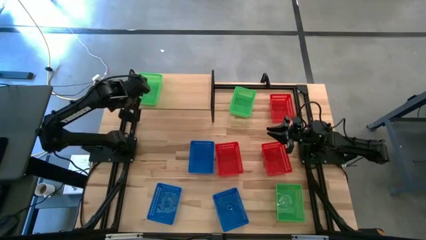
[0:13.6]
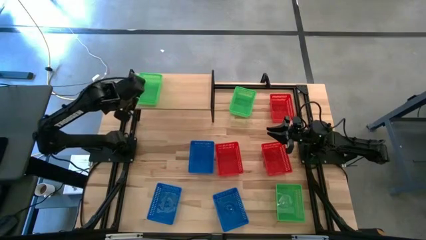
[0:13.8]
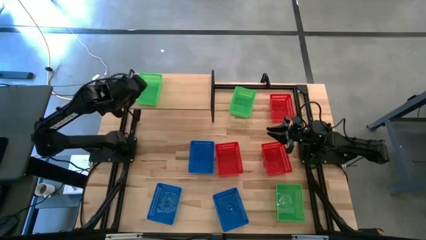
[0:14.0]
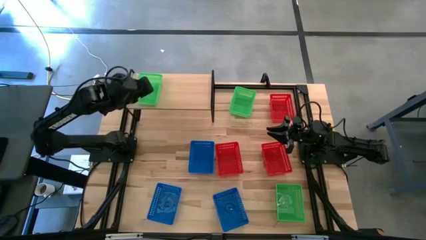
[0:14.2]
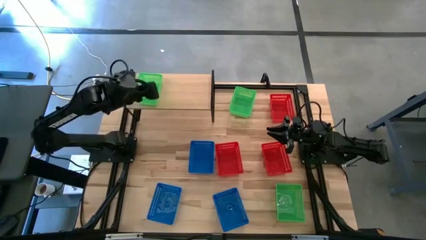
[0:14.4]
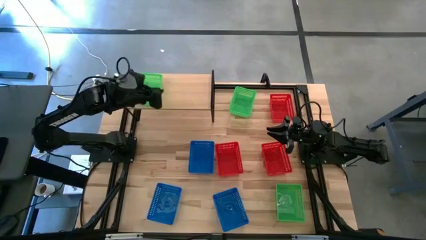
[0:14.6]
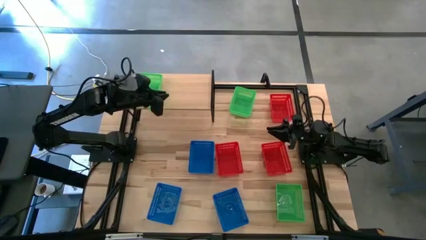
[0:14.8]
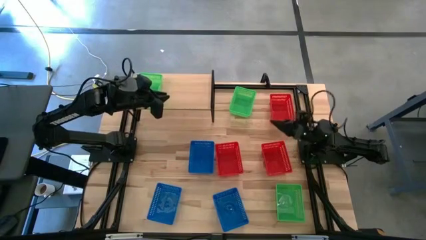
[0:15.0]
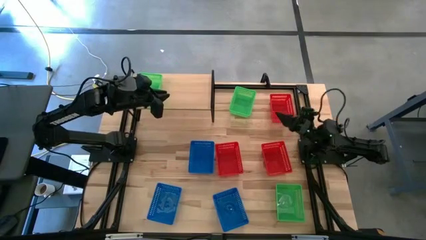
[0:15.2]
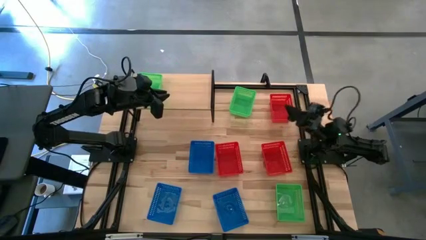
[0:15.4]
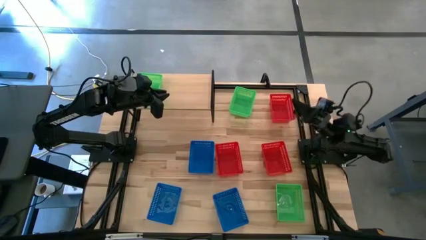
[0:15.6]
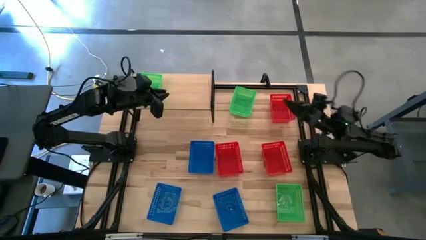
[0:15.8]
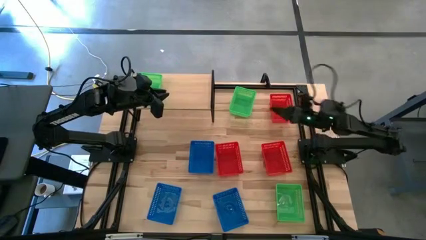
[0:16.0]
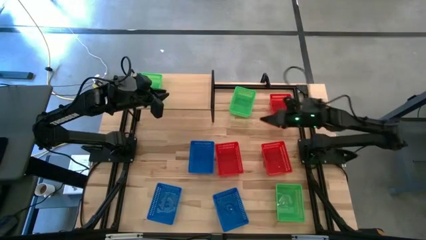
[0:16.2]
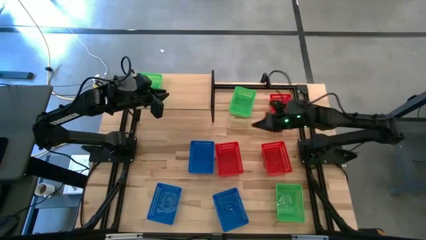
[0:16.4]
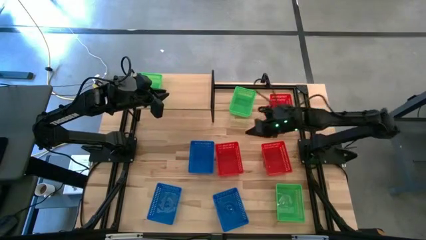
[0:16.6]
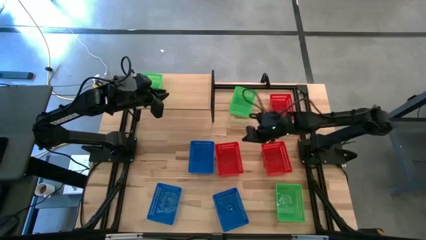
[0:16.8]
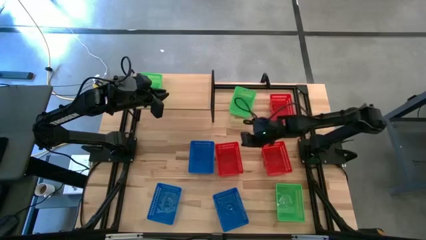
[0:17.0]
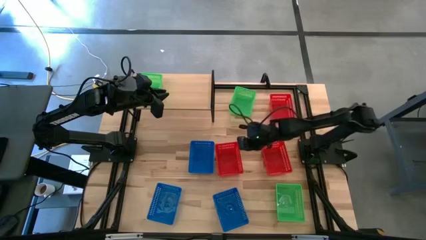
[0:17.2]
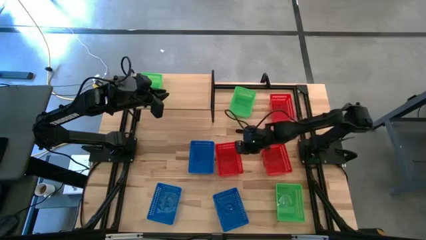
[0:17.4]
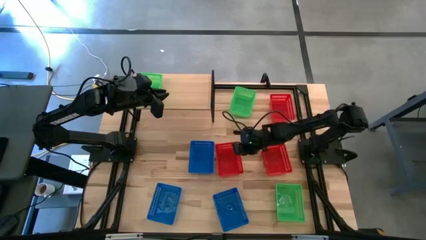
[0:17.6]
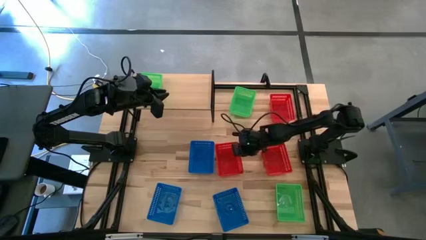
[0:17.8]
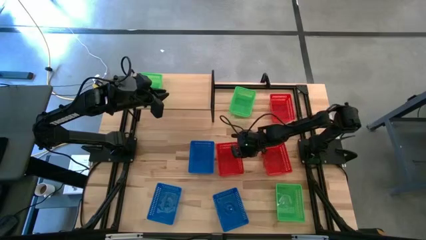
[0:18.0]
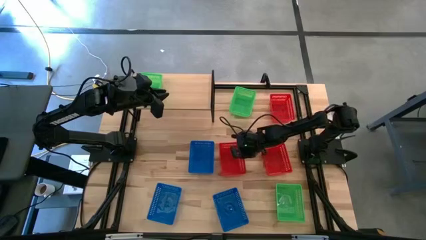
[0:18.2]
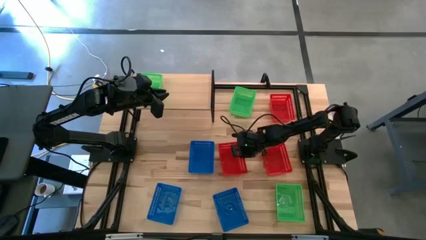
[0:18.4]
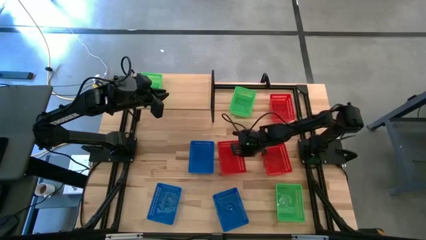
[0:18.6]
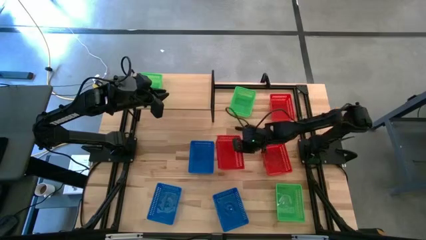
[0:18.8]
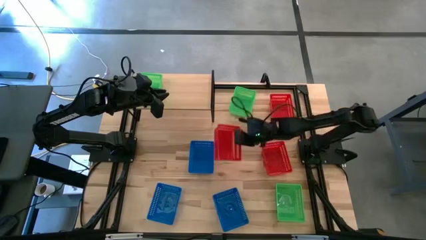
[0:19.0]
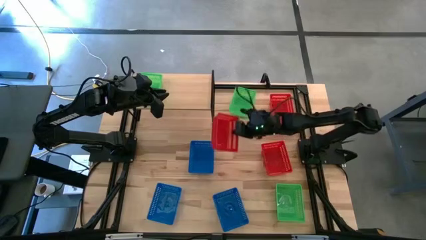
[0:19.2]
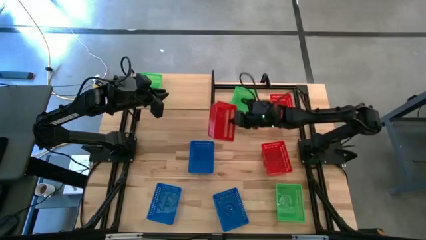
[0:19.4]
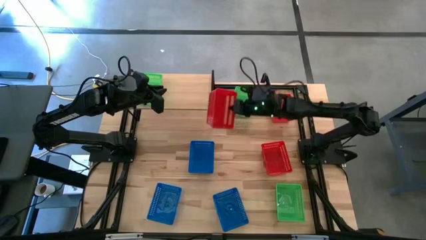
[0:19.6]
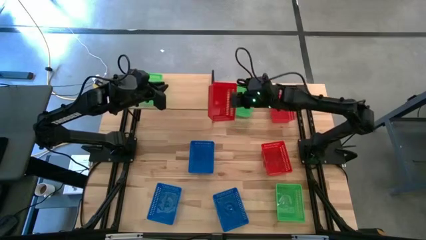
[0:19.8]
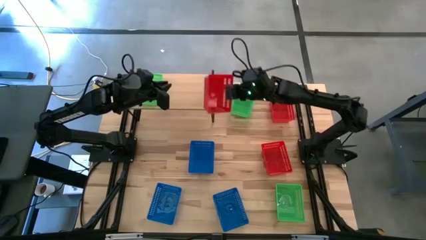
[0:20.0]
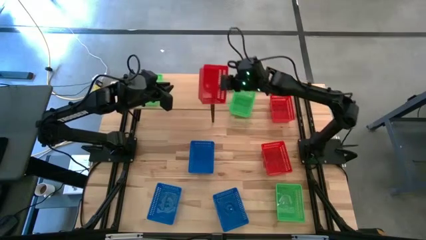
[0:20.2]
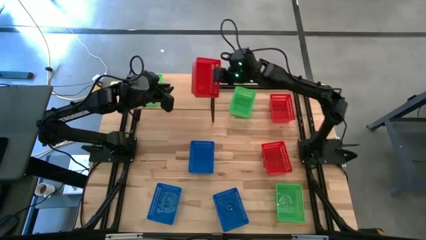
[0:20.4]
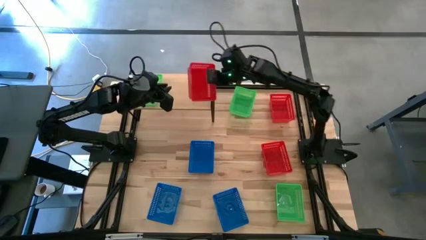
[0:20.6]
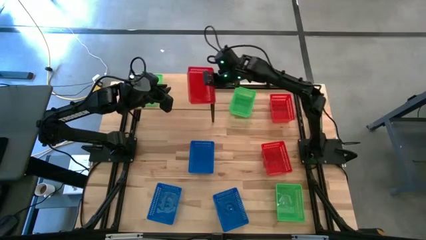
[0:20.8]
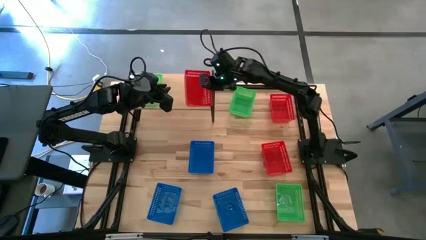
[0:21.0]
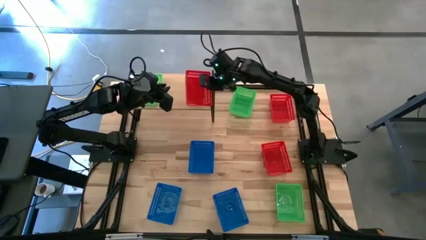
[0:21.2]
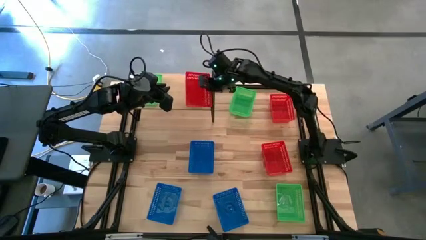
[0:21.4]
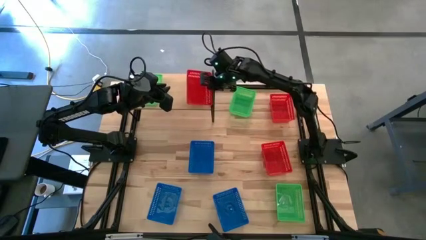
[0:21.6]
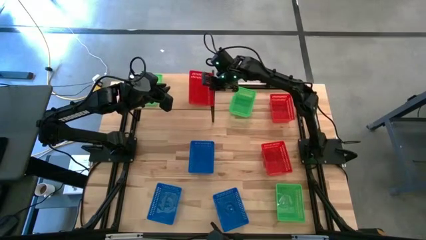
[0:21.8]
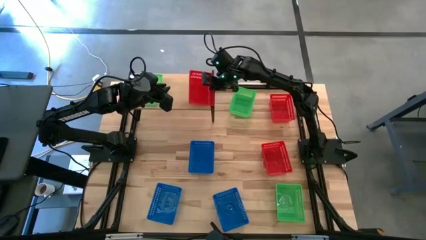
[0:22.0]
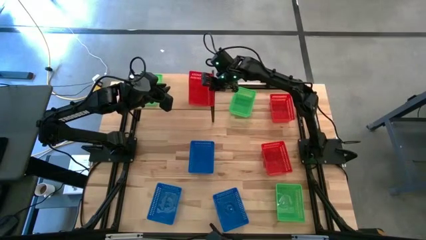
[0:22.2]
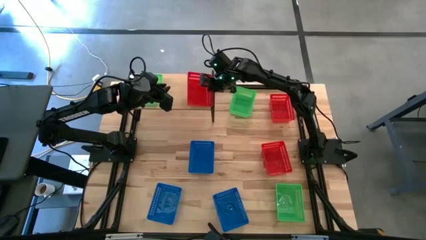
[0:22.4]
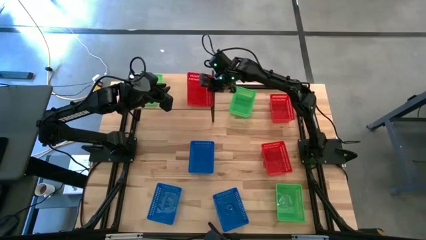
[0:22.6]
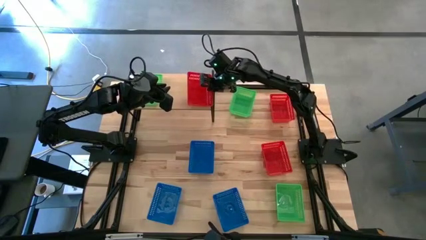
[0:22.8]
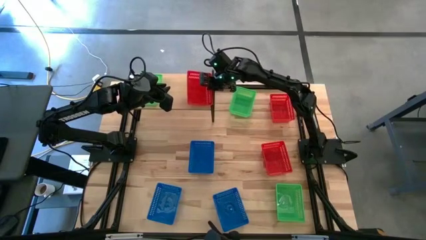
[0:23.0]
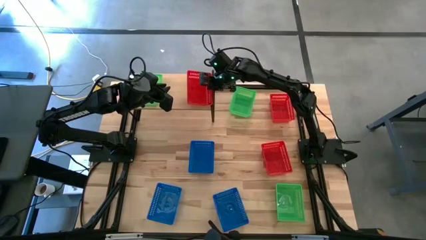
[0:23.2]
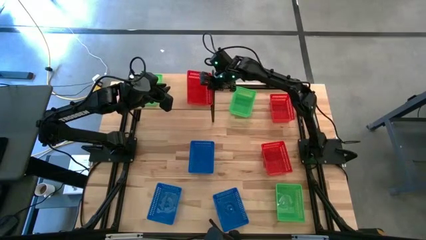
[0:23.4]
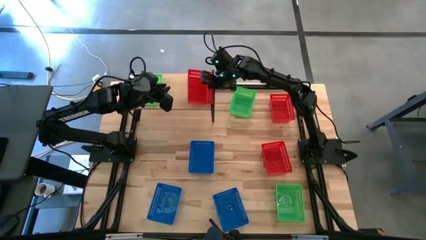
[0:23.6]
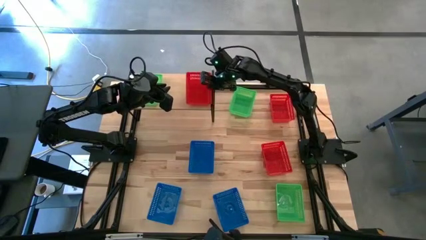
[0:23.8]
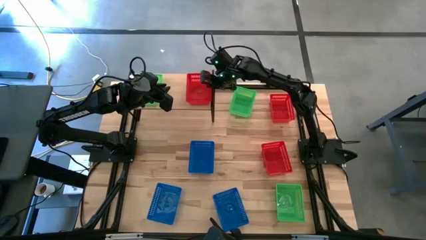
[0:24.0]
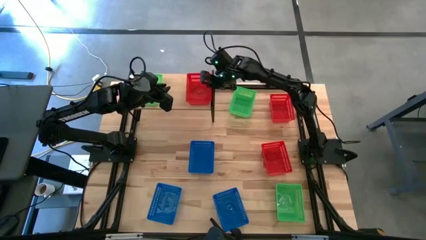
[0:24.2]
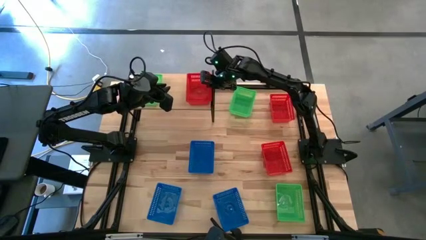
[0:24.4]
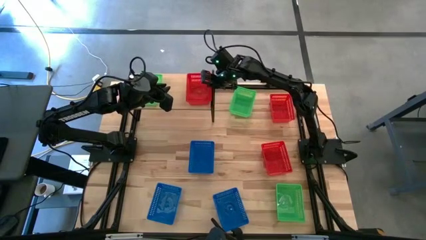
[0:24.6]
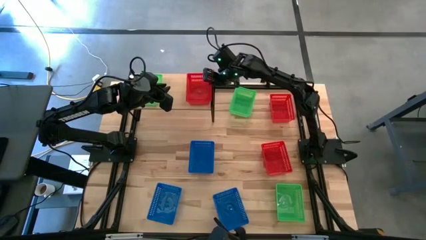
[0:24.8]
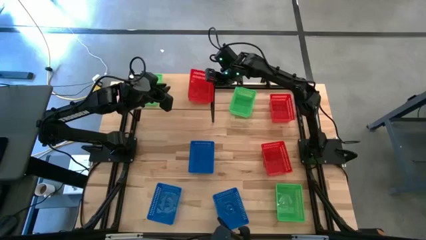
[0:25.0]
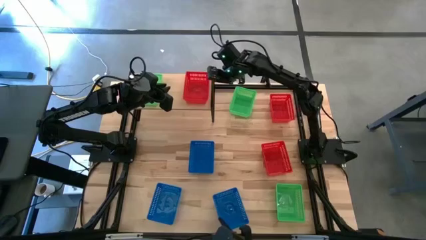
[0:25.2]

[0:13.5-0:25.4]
Task: Stack baskets on shelf by color
Put the bottom left red bin on the shelf

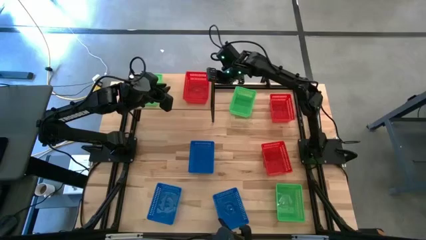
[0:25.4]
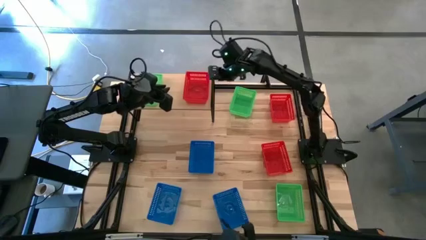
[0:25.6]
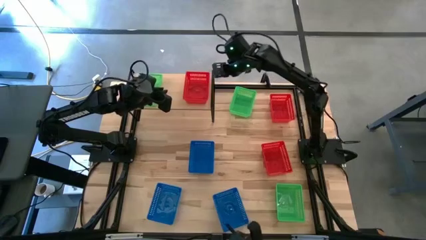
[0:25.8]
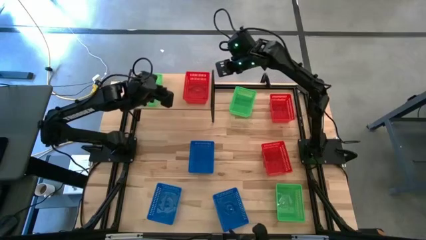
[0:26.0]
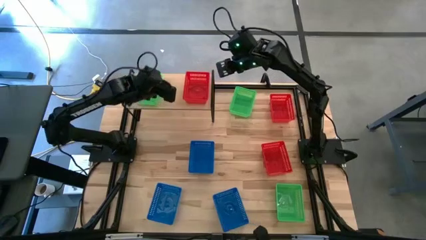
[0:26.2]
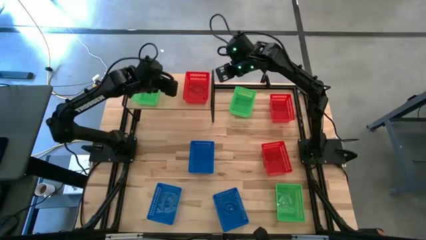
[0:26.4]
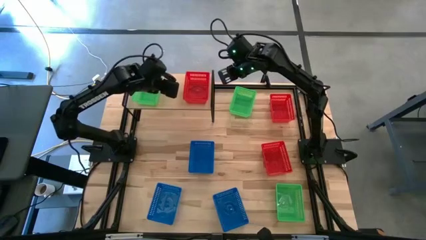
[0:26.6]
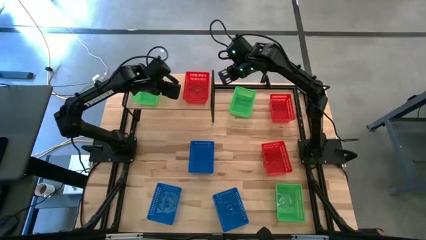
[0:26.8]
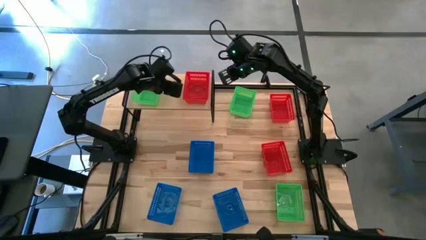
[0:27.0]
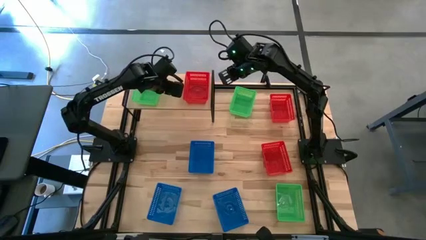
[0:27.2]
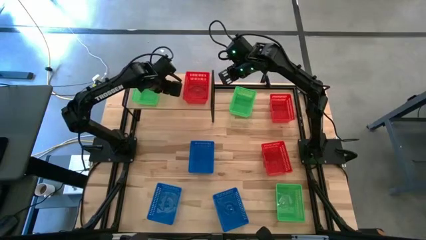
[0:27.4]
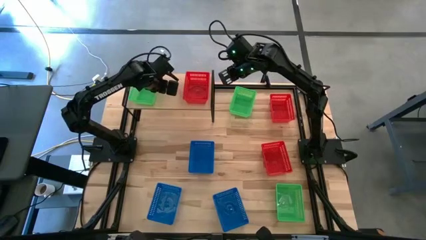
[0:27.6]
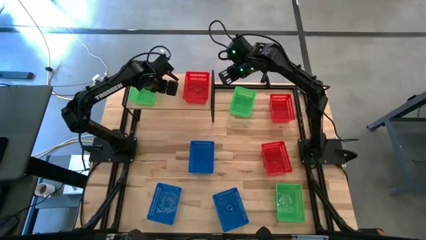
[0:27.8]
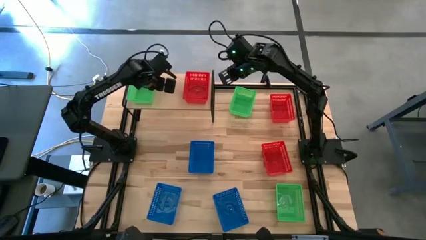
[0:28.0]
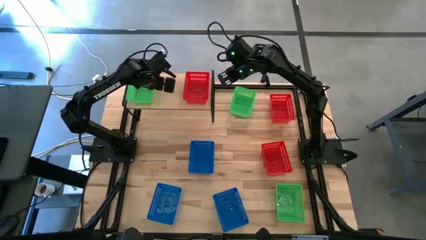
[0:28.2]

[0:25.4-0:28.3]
Adjust the green bin on the shelf

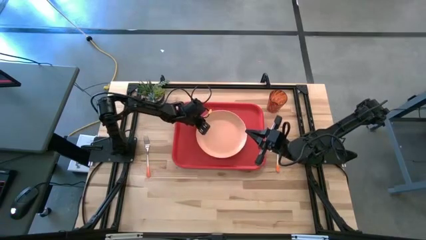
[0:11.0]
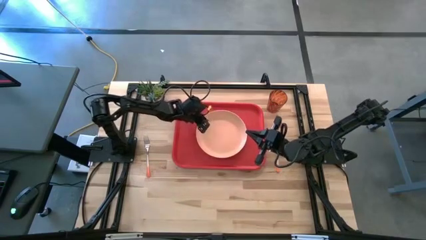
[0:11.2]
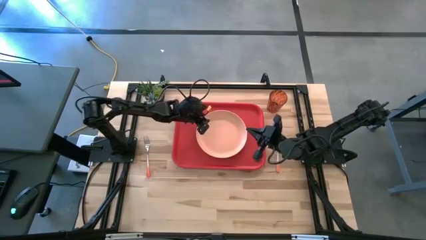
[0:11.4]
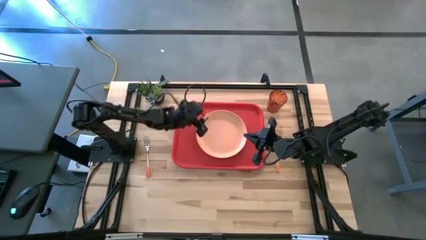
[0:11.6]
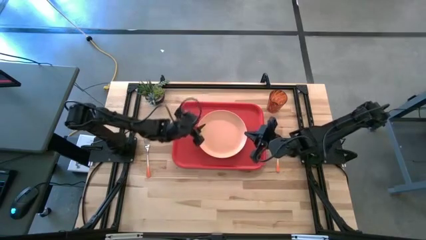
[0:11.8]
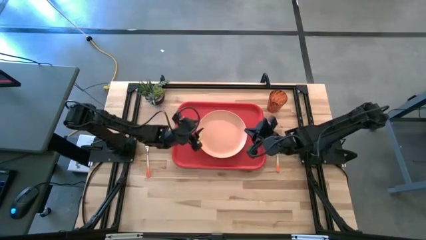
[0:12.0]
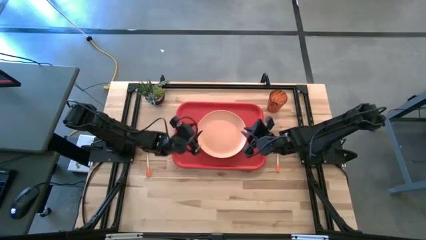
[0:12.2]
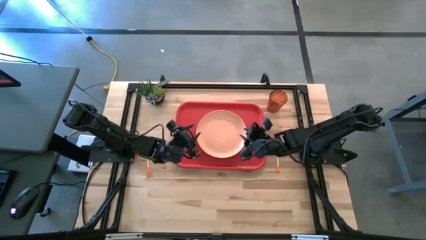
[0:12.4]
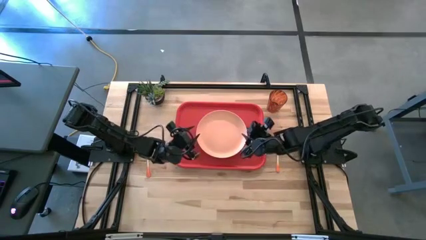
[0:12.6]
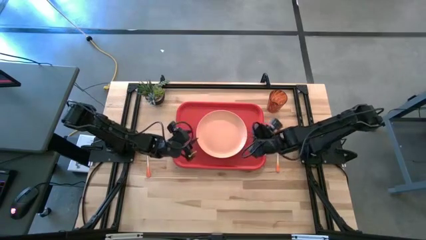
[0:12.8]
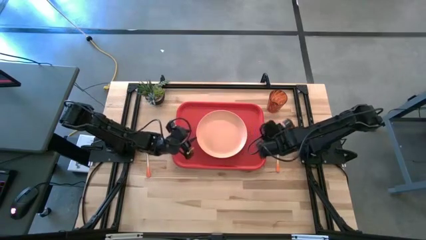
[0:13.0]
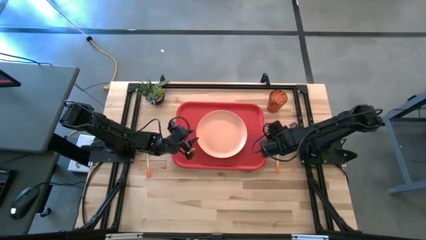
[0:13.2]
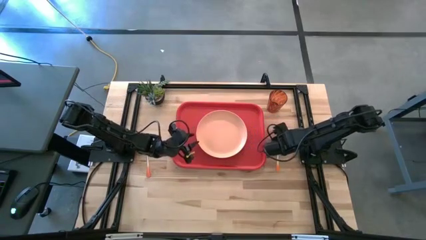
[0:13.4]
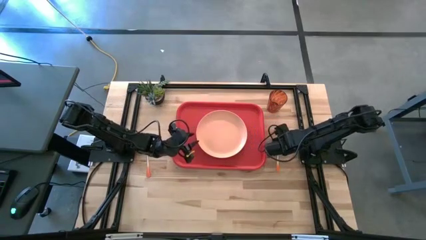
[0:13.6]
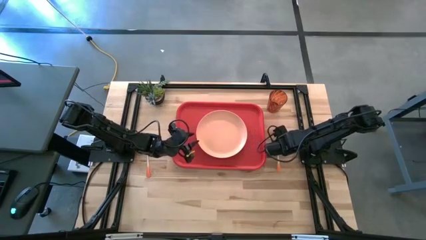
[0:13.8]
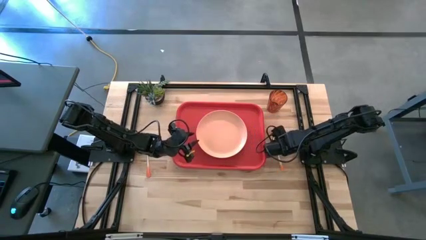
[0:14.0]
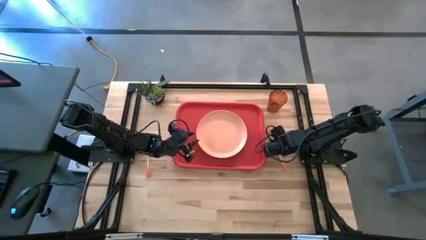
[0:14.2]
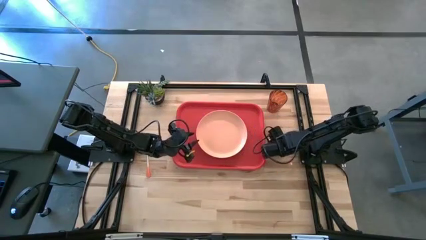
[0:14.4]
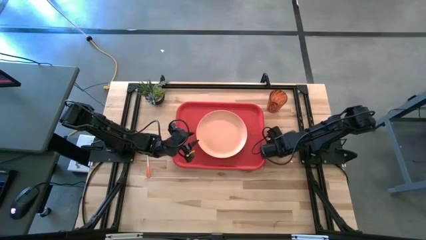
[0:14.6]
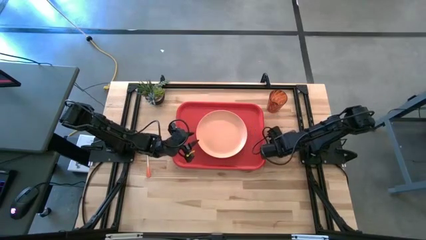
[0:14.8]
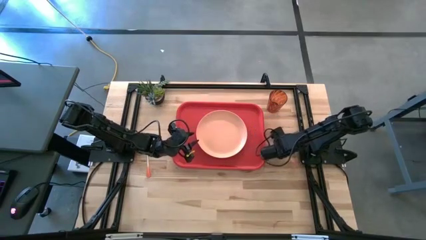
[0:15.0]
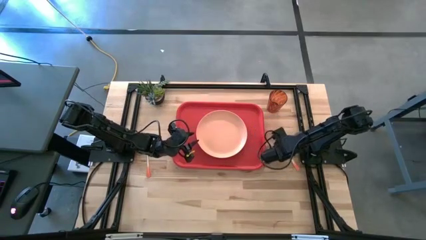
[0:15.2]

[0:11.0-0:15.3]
Task: Pick and place plate/cup/fork/spoon on tray
Put the orange spoon on the red serving tray
